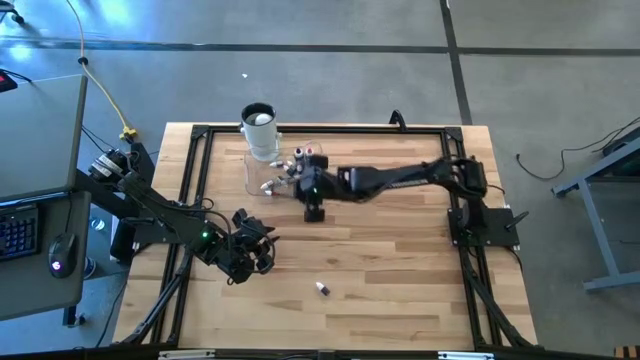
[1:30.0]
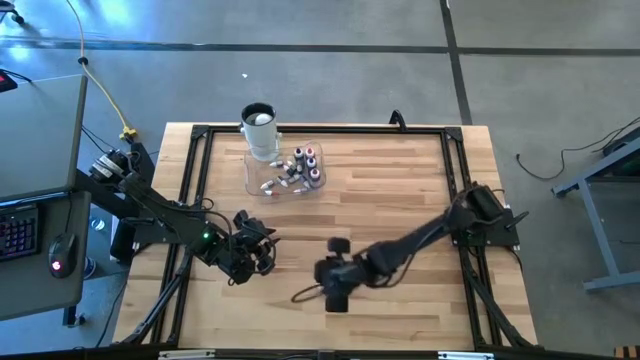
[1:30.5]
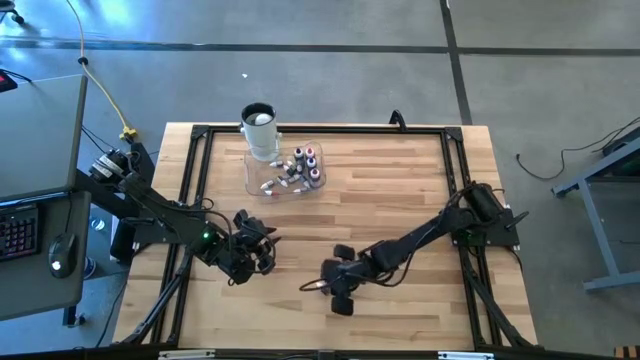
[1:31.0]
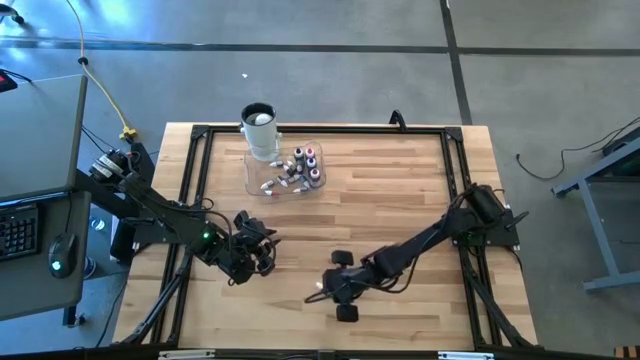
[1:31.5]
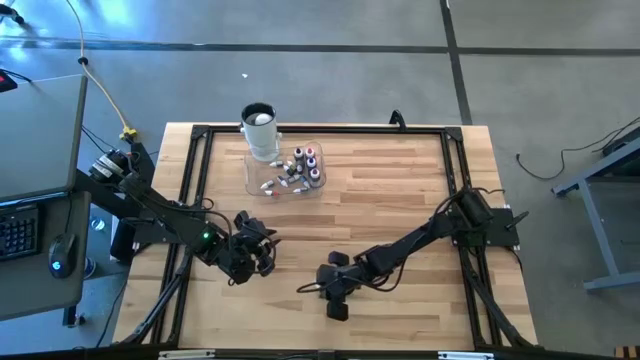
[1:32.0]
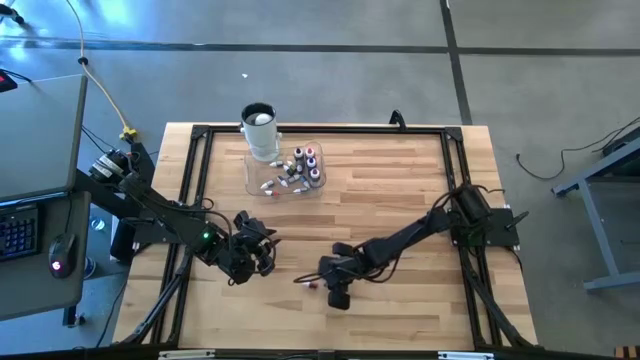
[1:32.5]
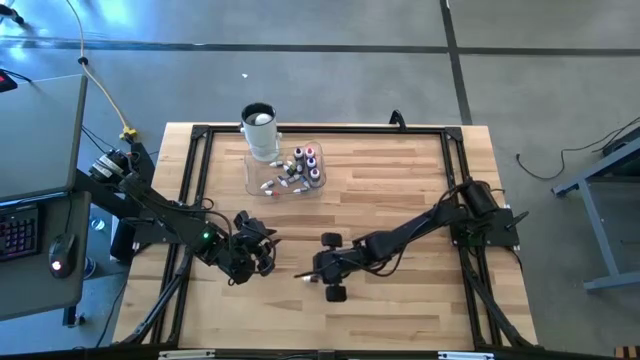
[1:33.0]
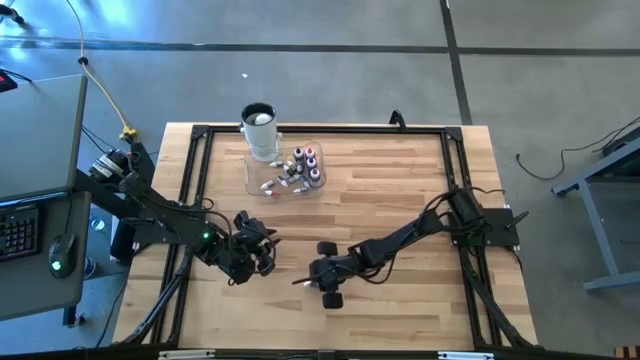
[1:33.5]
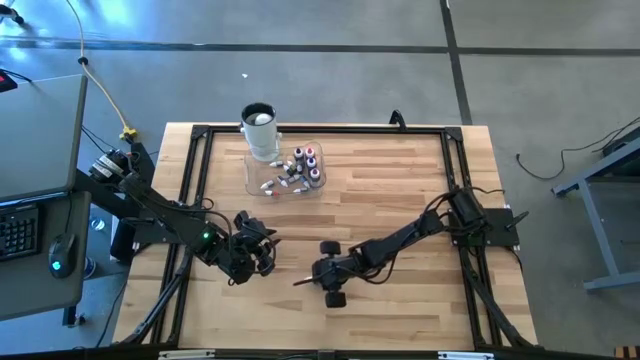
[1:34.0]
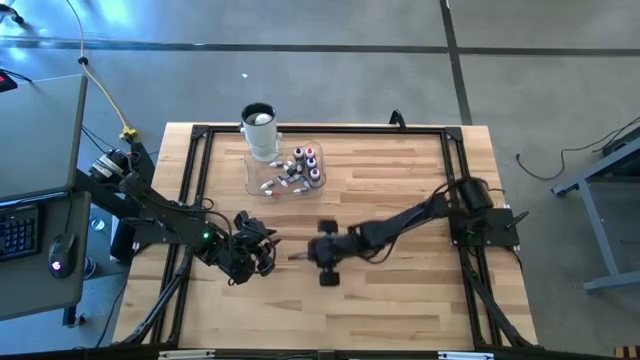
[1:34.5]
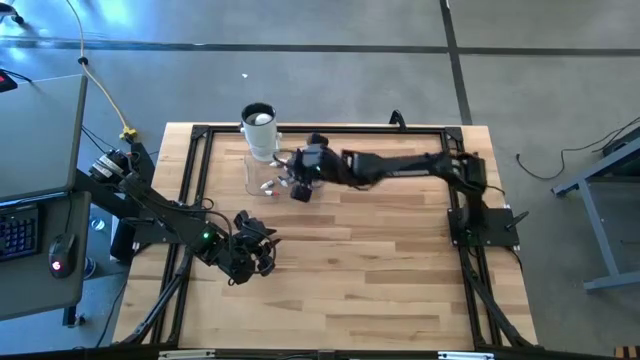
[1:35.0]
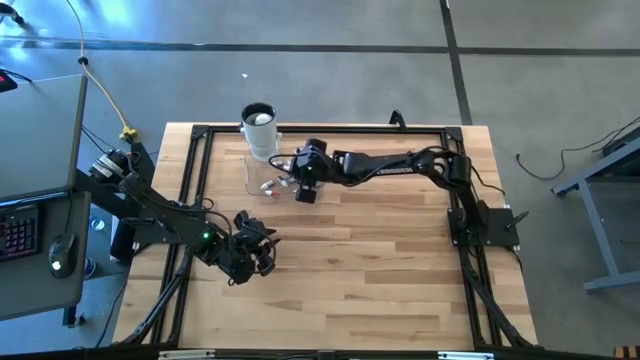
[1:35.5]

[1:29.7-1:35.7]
Task: Pick & Place food coloring
Put the small red food coloring bottle into the transparent bin

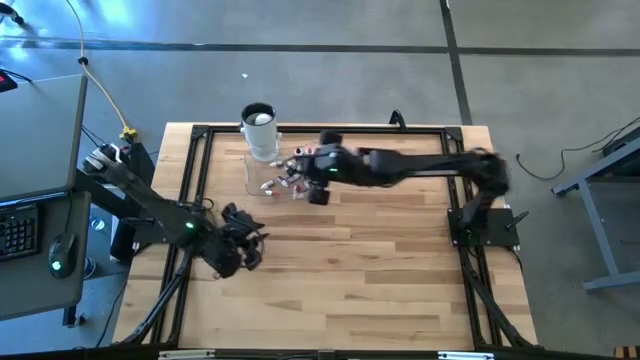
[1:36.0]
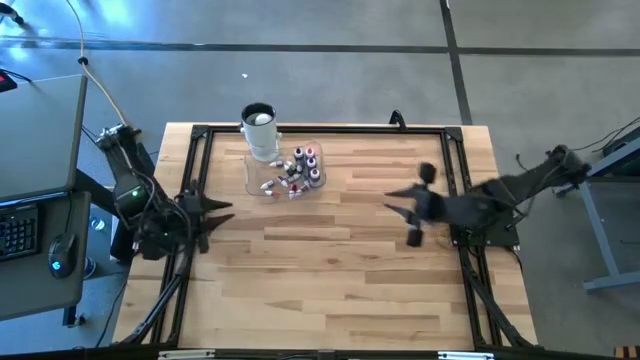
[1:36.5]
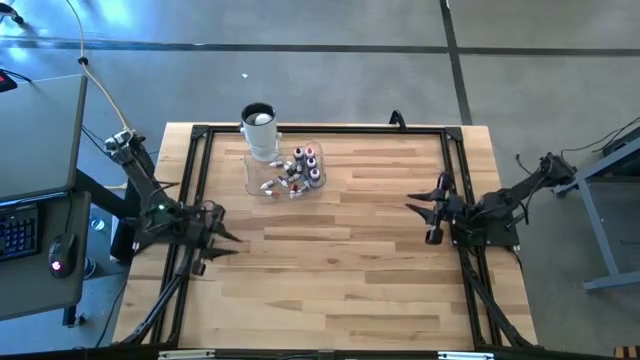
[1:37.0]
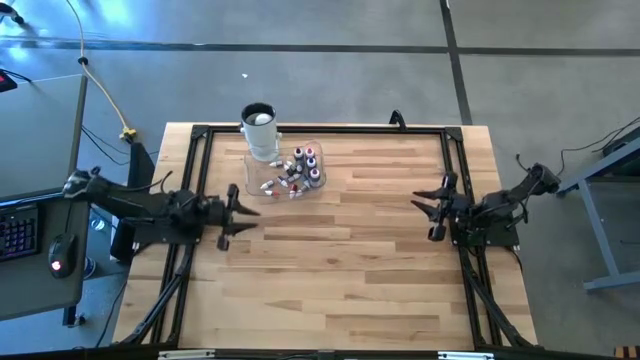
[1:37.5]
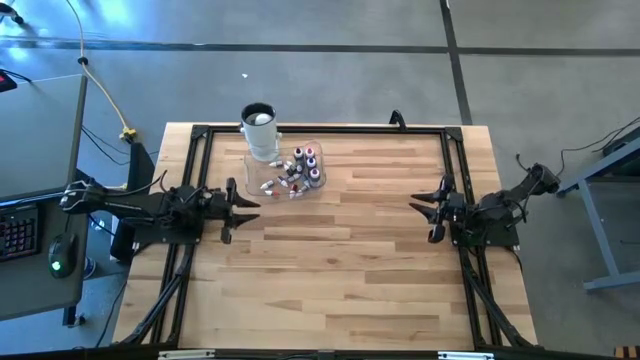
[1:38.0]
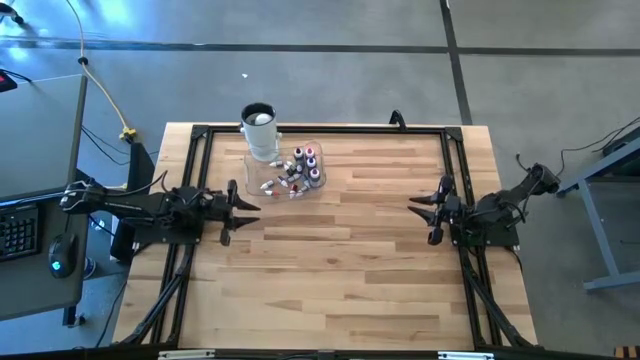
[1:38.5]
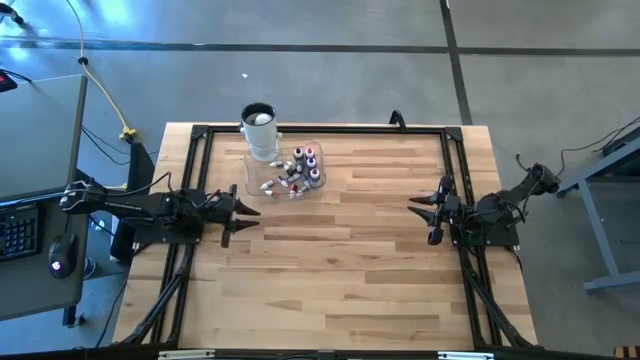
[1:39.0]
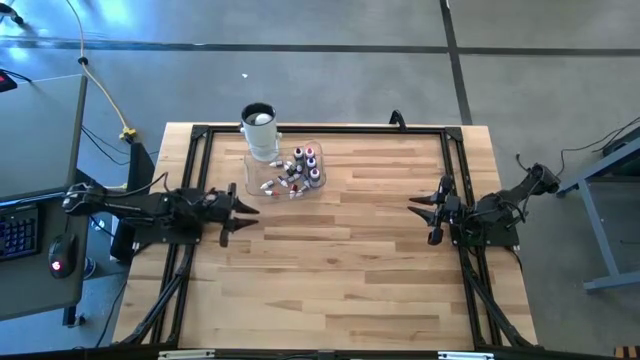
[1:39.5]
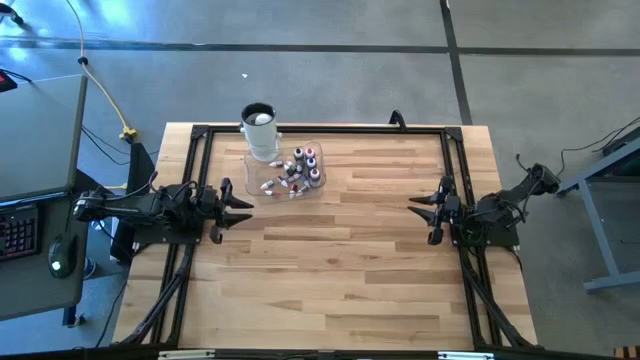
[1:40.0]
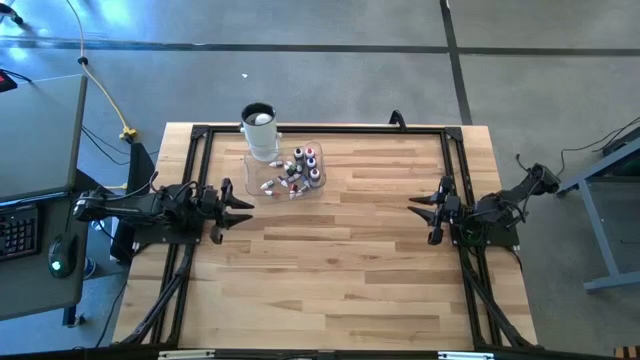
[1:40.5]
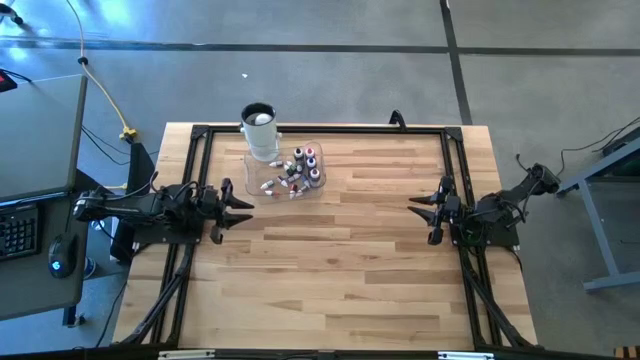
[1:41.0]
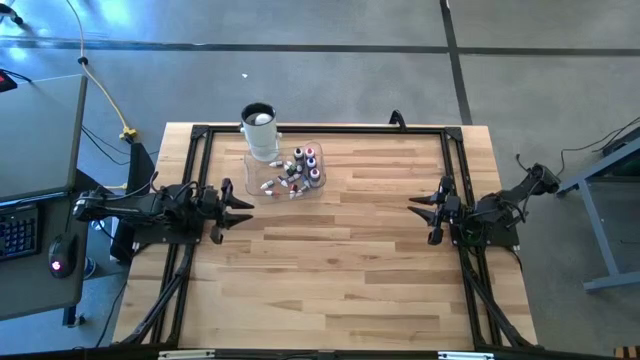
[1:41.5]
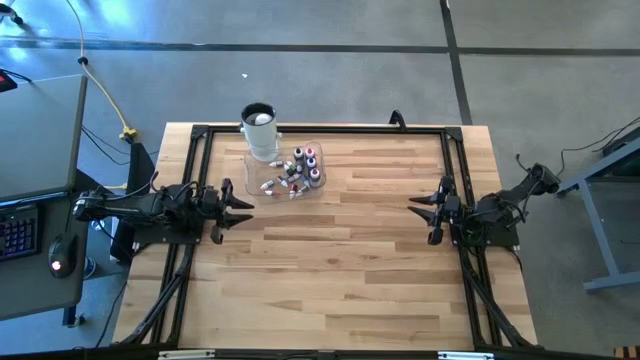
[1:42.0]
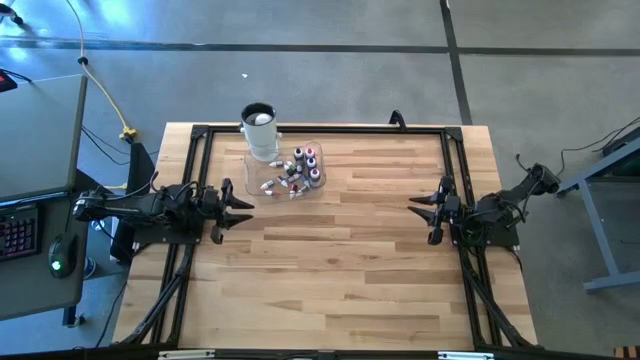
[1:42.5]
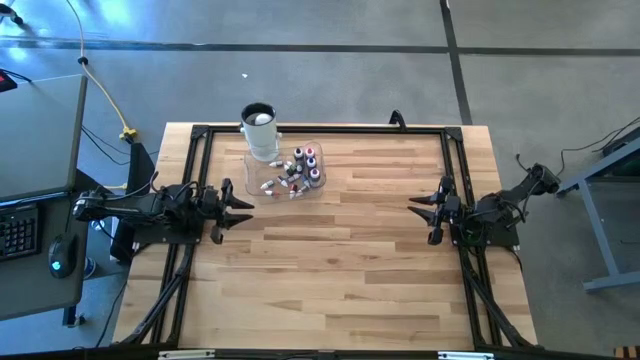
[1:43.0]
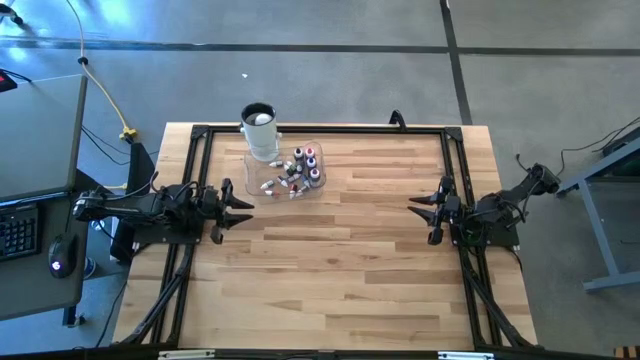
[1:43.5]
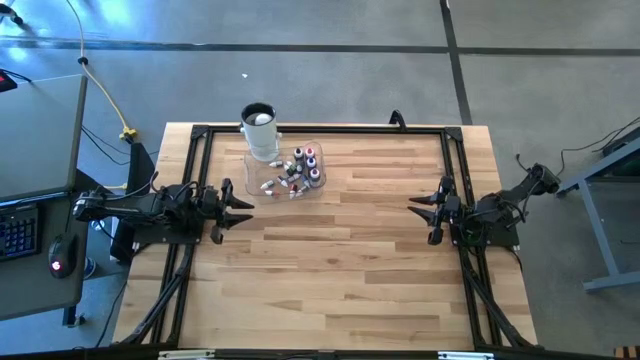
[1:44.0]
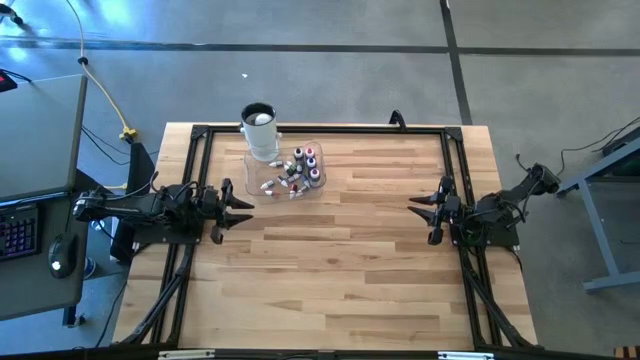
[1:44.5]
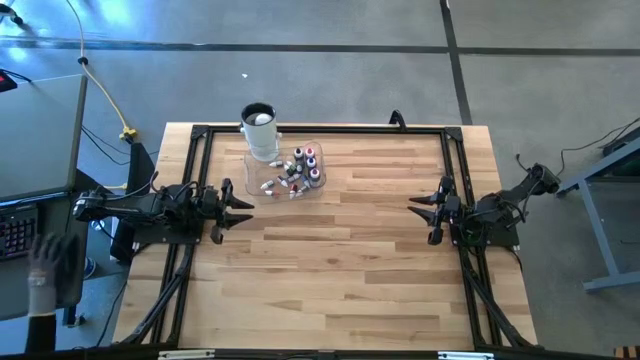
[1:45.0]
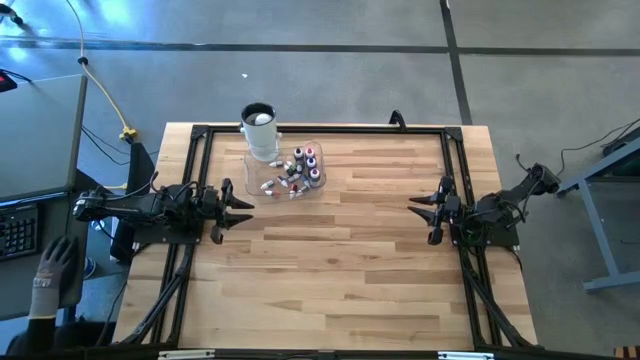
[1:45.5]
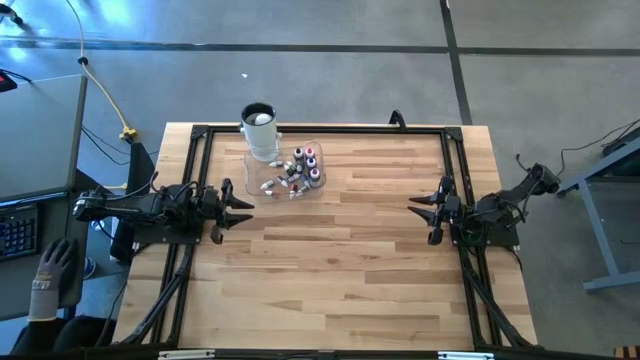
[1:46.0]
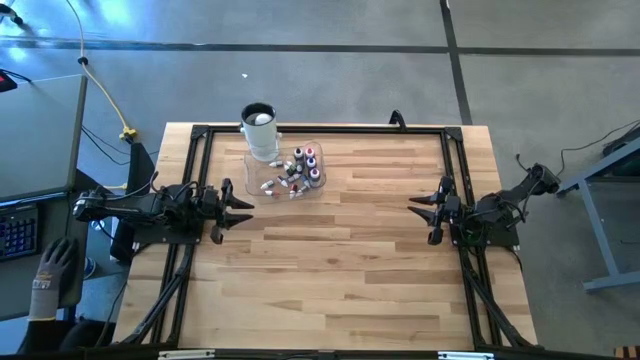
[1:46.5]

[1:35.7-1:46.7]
Return to Home Position

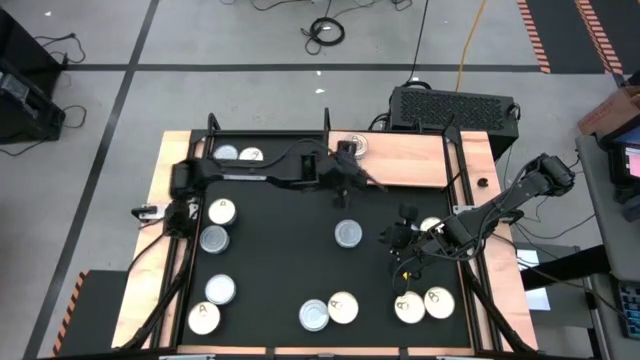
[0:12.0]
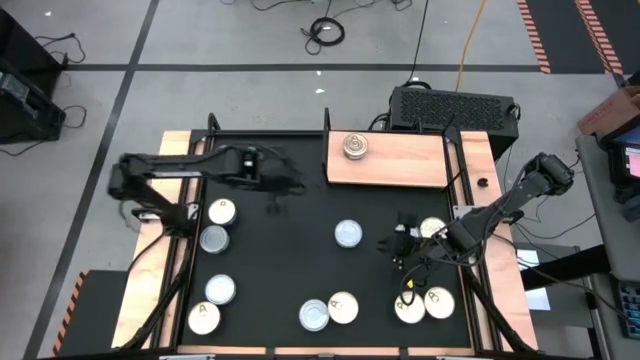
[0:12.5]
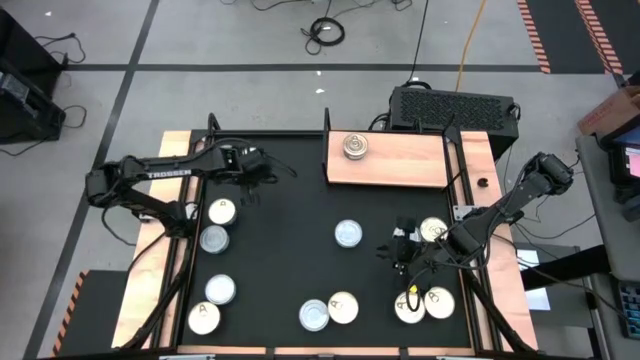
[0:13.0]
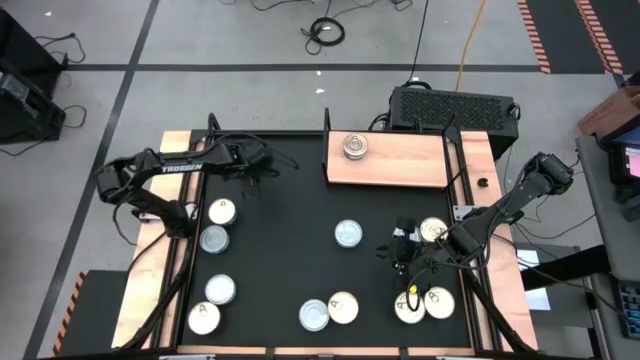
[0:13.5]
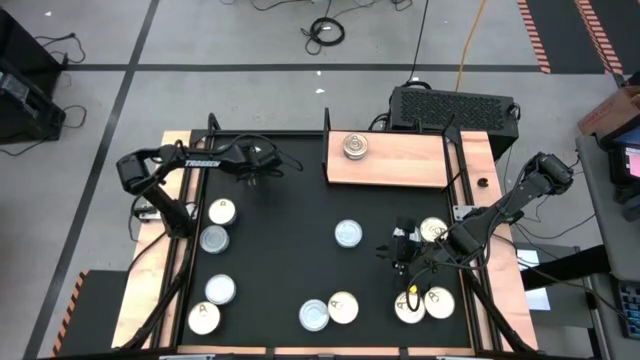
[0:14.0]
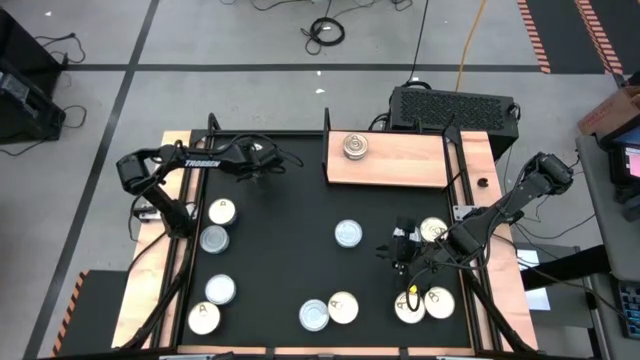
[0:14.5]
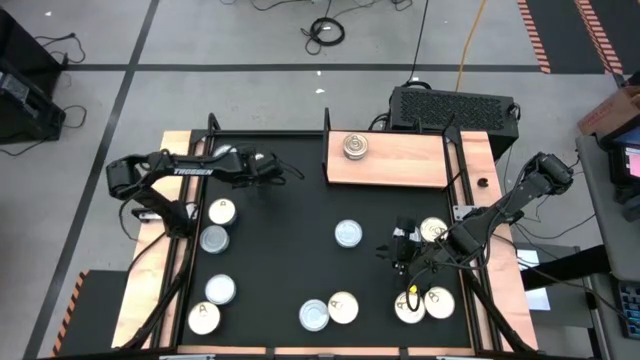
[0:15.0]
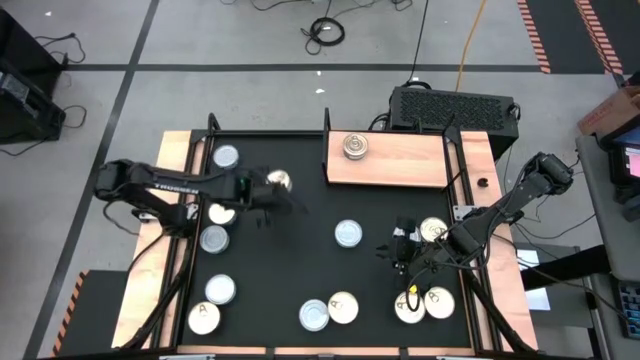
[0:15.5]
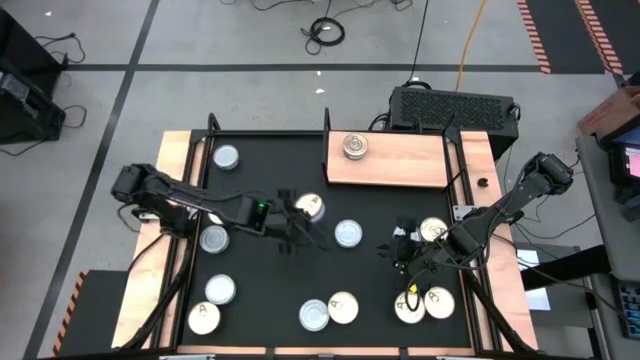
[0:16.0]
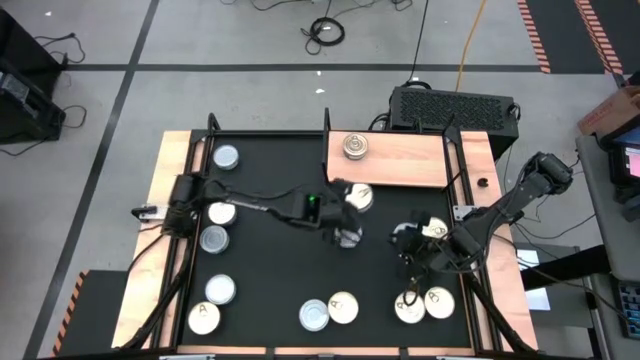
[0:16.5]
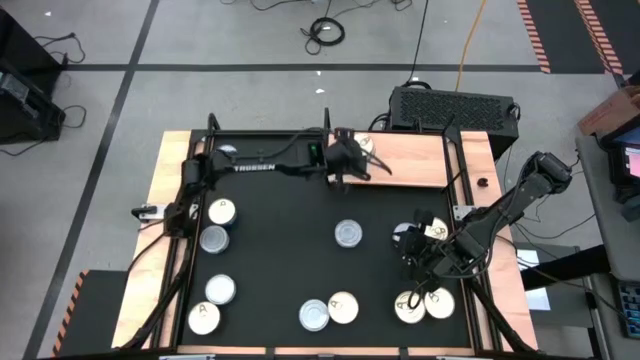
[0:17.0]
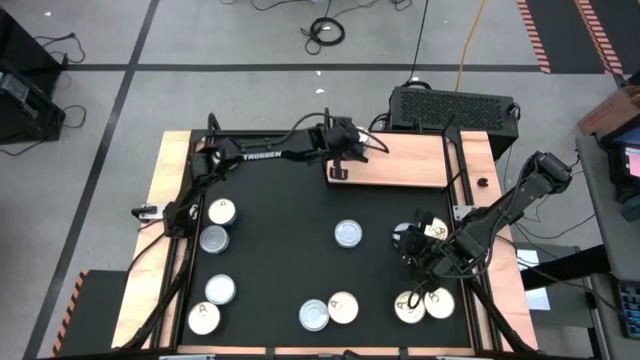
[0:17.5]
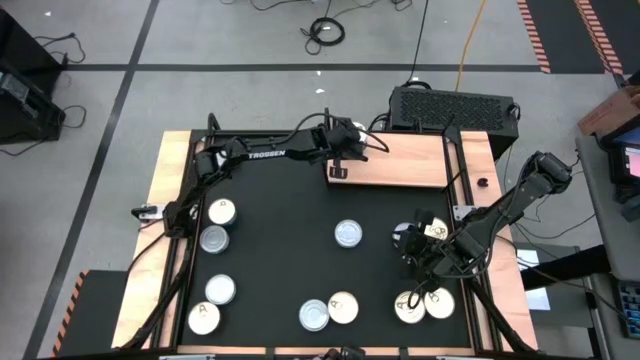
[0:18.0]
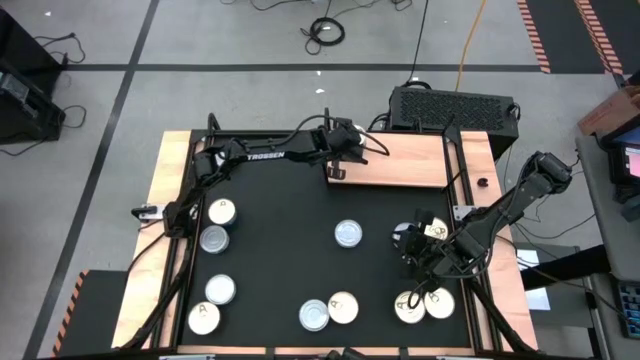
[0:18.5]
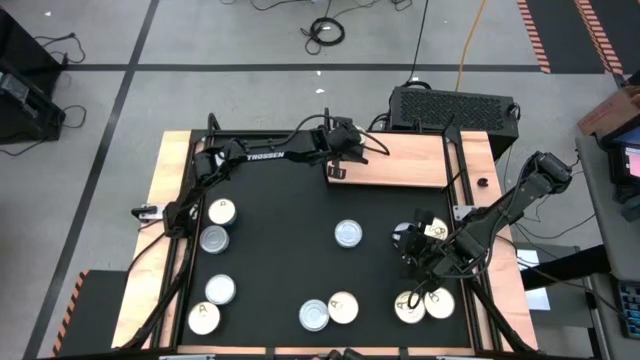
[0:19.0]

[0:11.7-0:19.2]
Task: Stack canned seafood by type on shelf
Stack the blue-pink tuna can on top of the other blue-pink tuna can on the shelf
